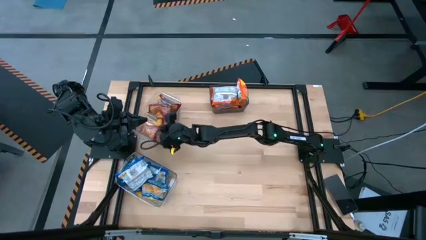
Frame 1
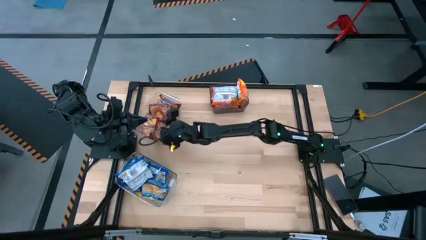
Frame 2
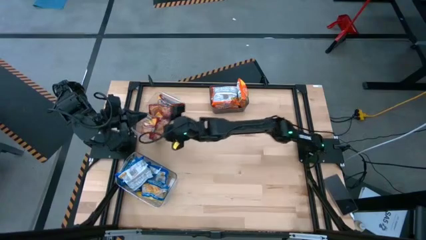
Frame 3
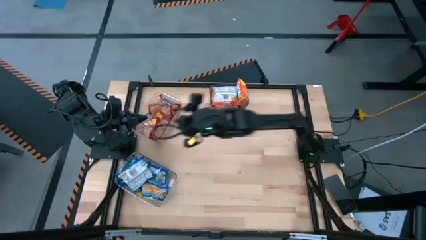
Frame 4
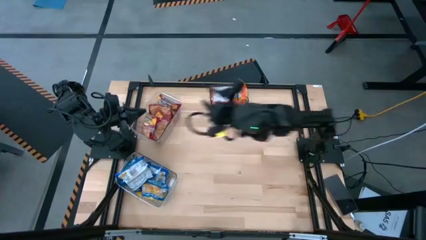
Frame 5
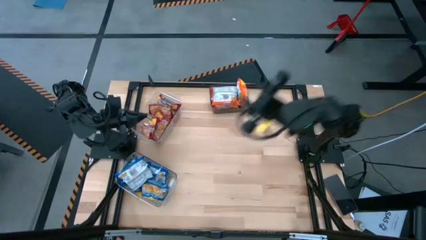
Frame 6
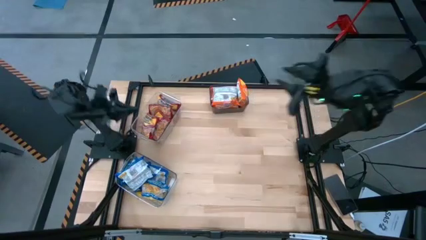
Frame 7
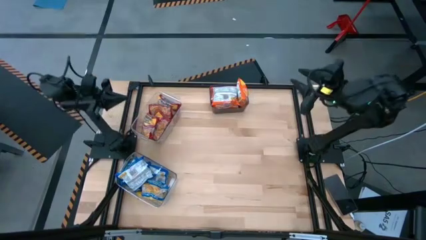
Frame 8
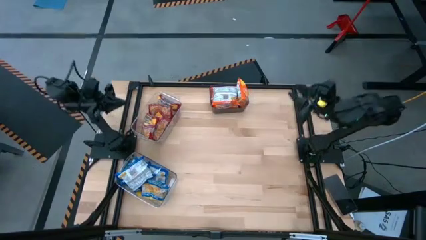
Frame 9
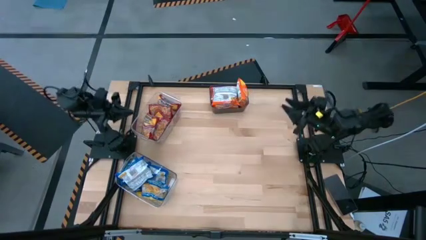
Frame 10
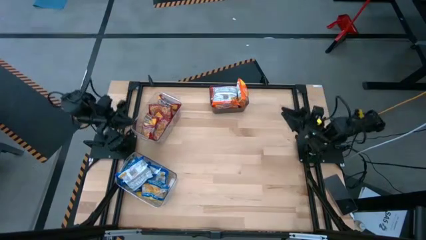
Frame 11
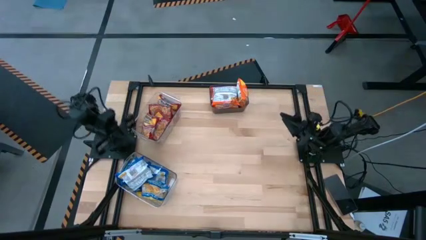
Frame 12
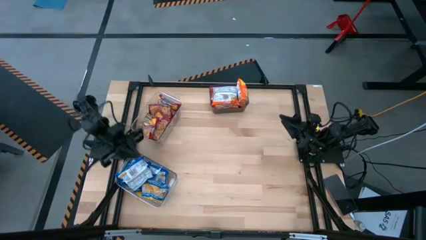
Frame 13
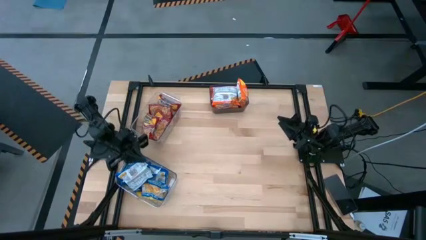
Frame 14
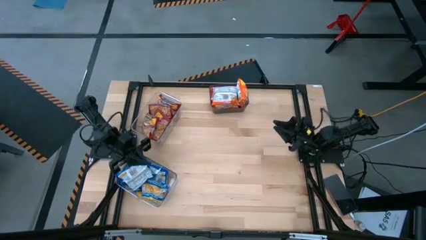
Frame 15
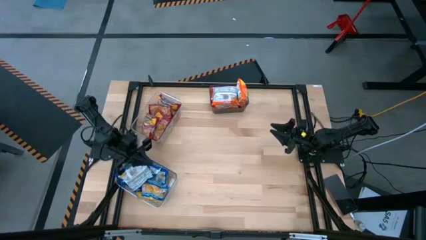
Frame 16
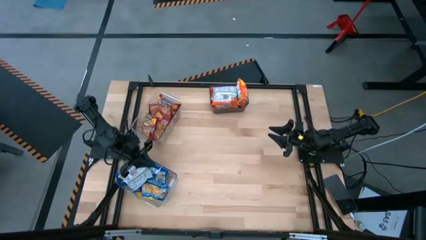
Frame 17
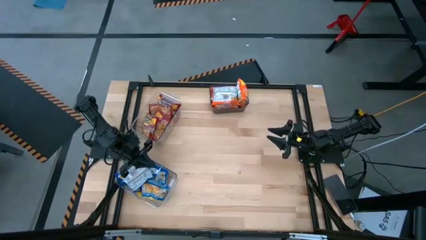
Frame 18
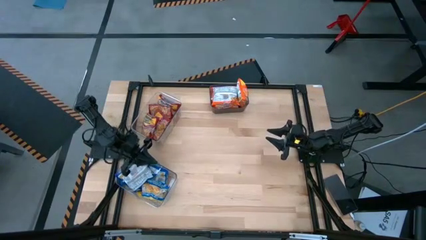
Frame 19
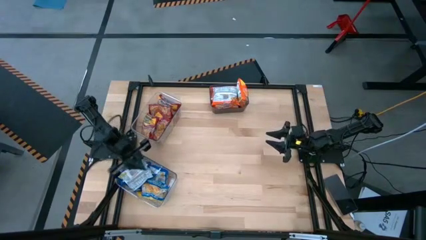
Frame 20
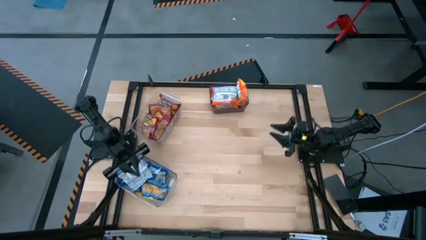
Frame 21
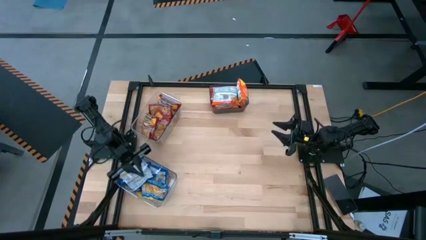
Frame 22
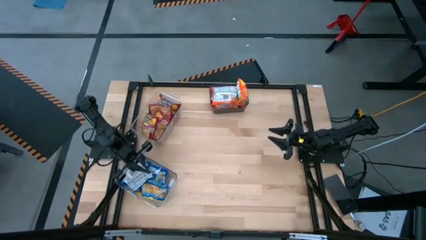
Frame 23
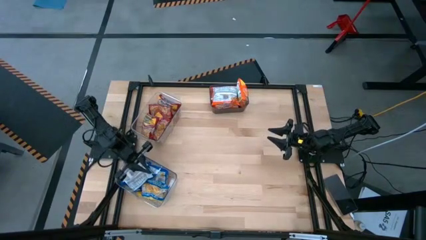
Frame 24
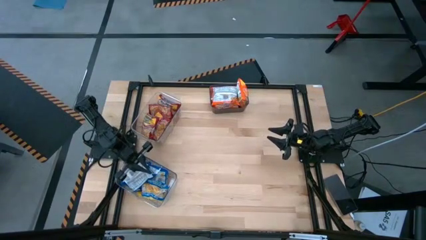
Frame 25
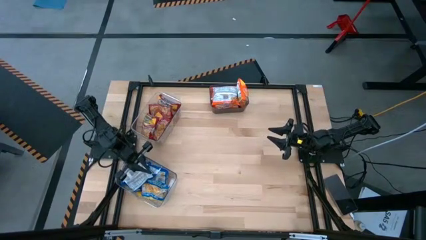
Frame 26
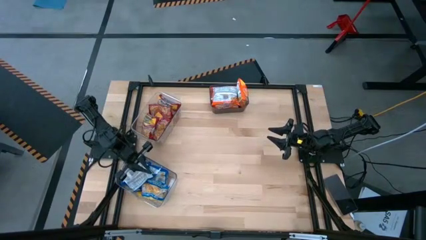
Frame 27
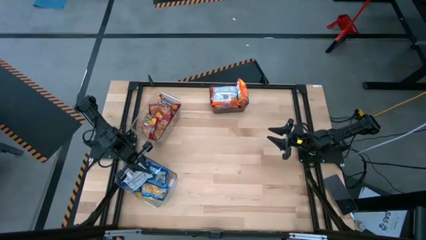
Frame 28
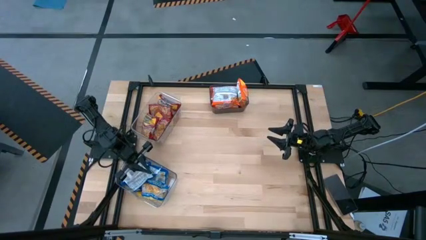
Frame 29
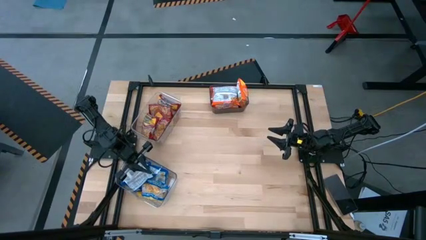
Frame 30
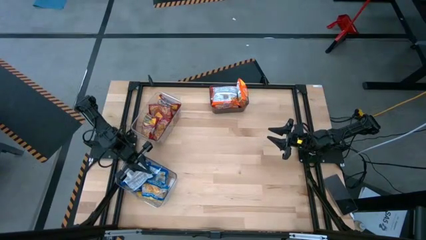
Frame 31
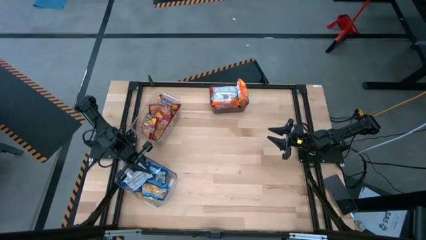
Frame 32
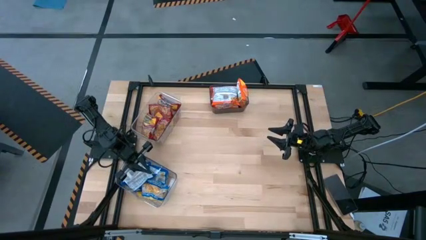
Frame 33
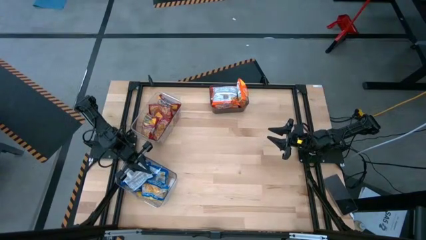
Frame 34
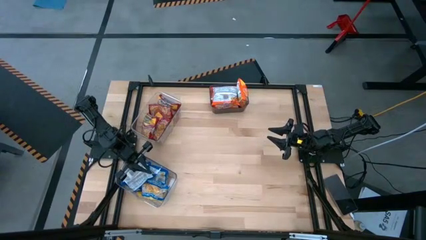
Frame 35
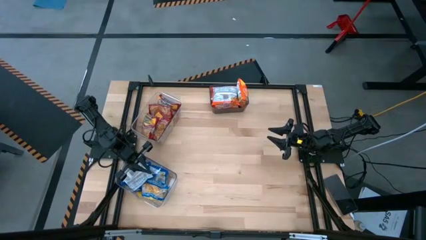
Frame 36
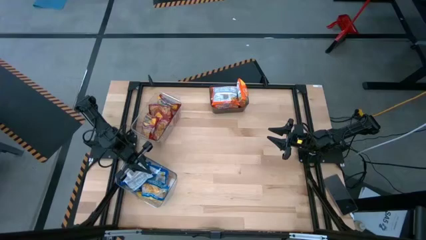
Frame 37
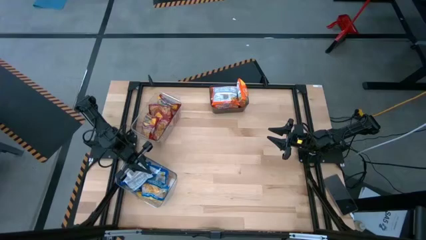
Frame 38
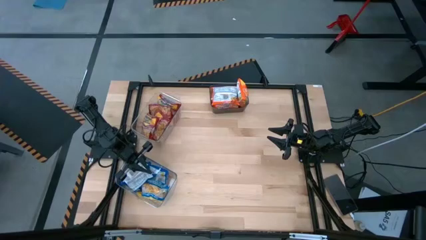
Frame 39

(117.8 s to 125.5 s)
Task: Sort Maruchan noodles
Return to Home Position

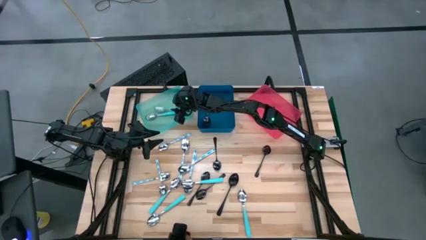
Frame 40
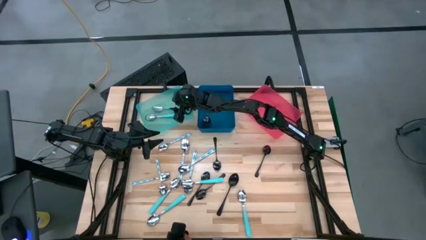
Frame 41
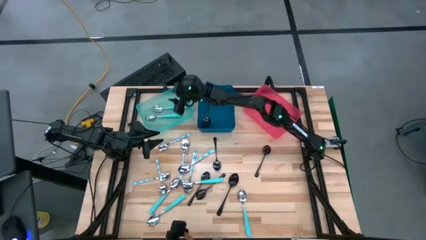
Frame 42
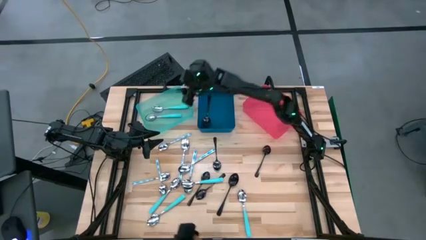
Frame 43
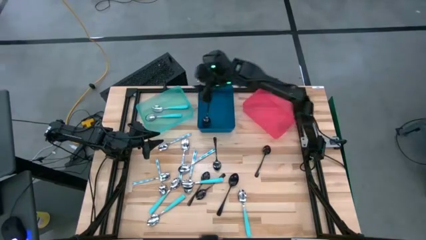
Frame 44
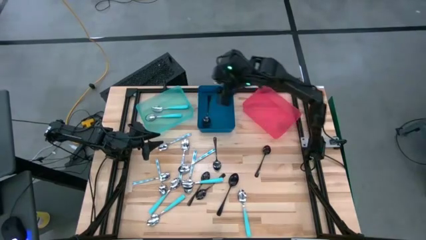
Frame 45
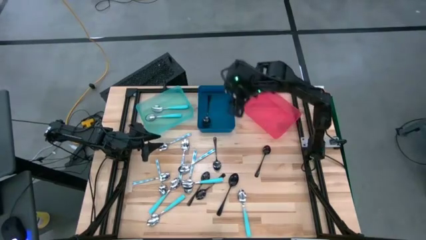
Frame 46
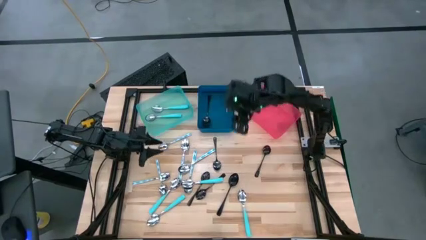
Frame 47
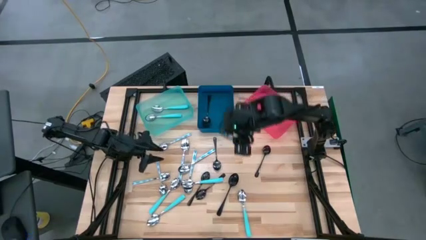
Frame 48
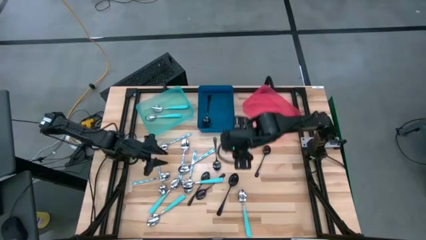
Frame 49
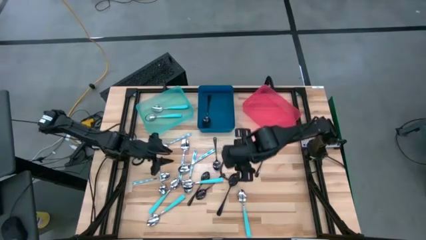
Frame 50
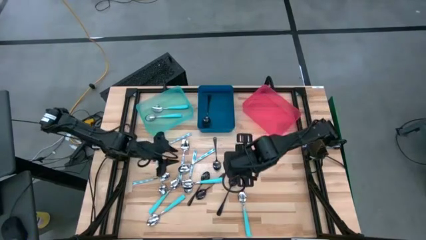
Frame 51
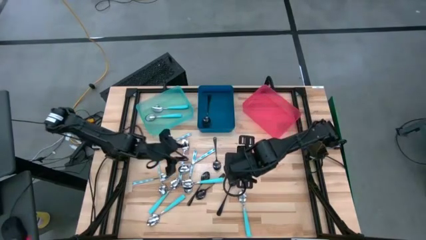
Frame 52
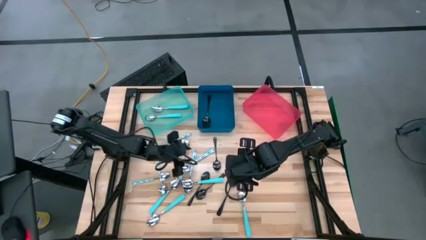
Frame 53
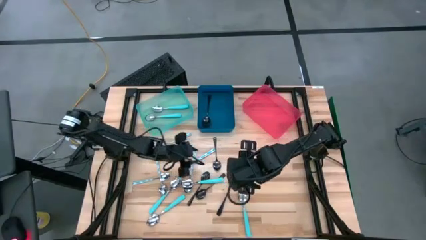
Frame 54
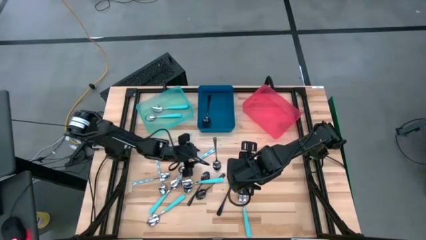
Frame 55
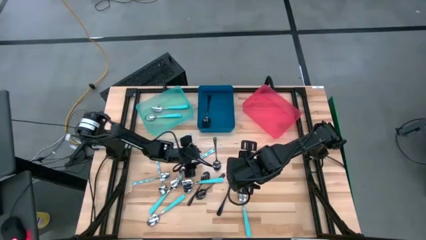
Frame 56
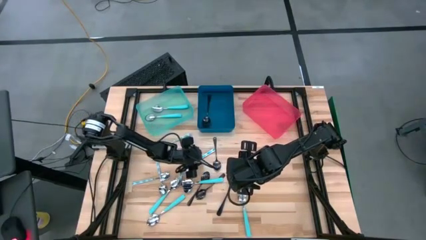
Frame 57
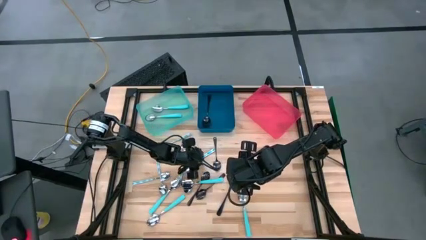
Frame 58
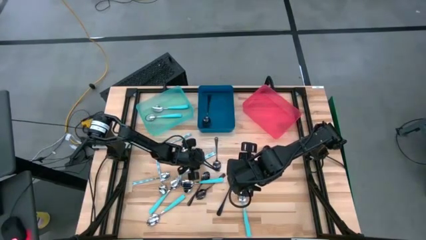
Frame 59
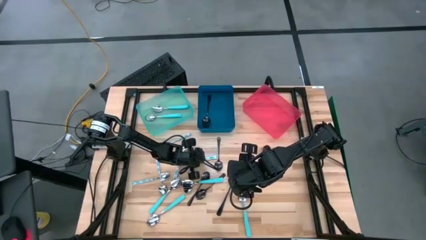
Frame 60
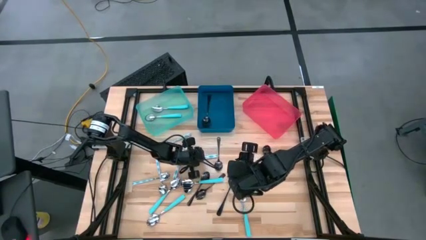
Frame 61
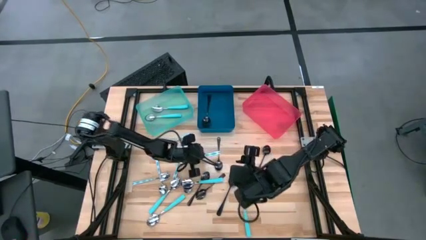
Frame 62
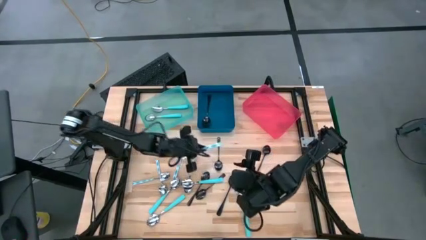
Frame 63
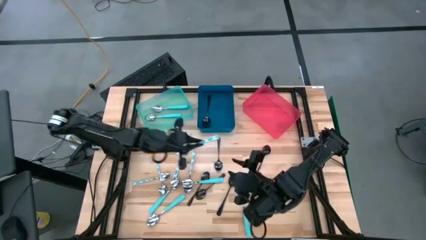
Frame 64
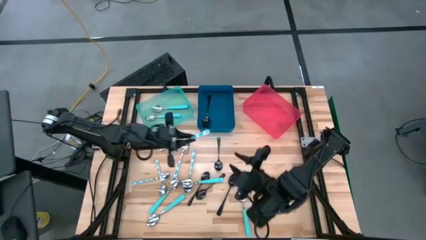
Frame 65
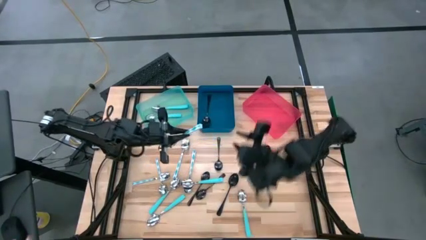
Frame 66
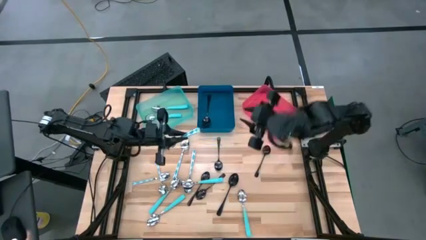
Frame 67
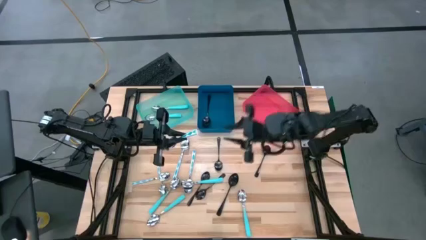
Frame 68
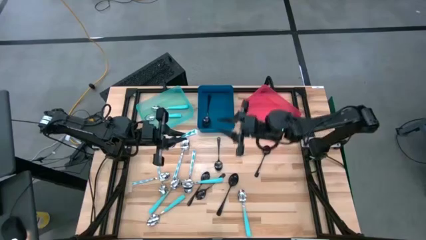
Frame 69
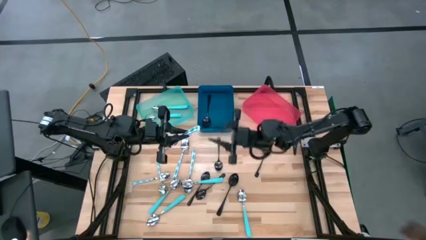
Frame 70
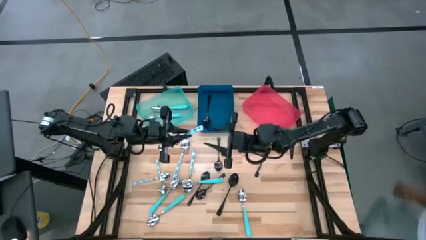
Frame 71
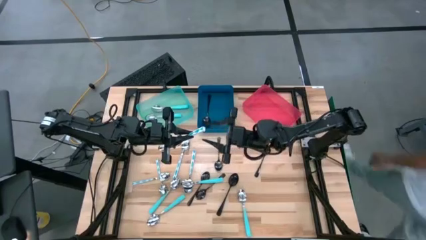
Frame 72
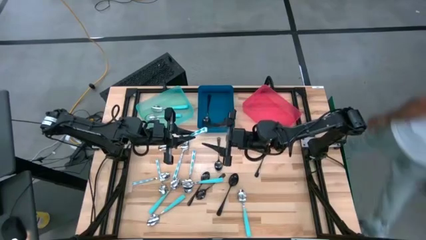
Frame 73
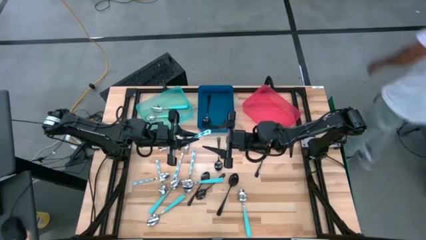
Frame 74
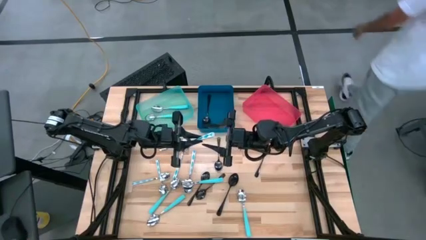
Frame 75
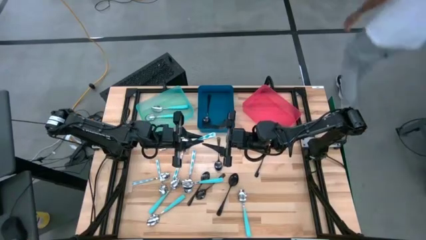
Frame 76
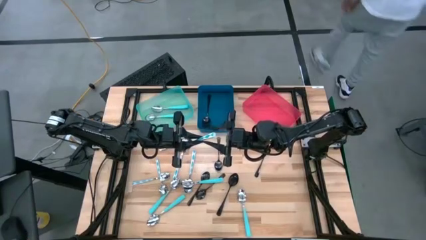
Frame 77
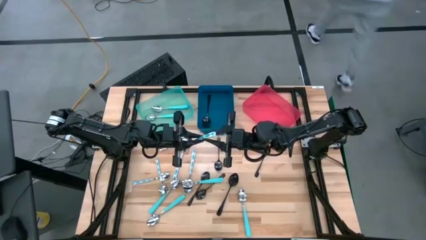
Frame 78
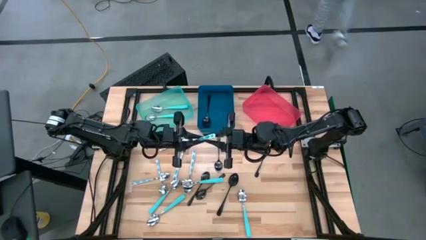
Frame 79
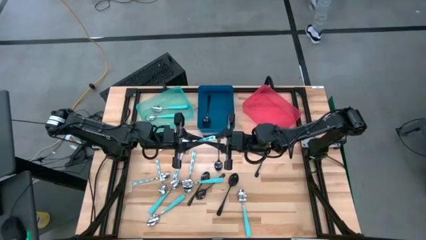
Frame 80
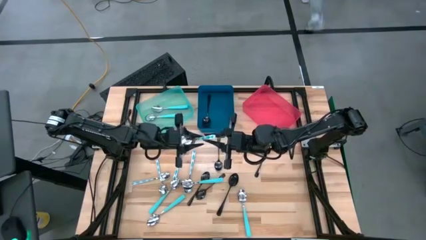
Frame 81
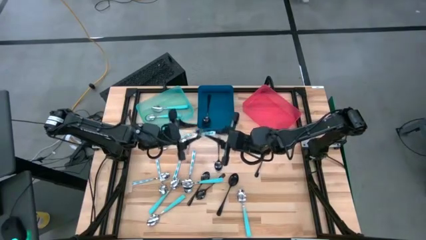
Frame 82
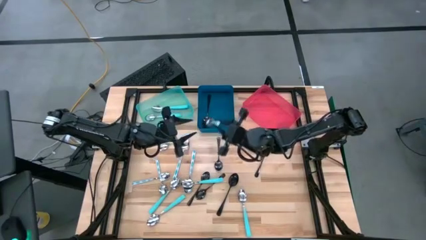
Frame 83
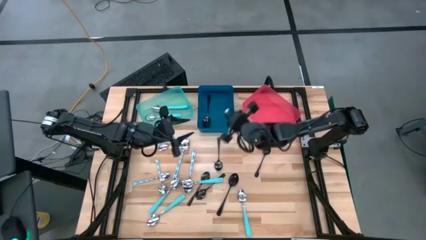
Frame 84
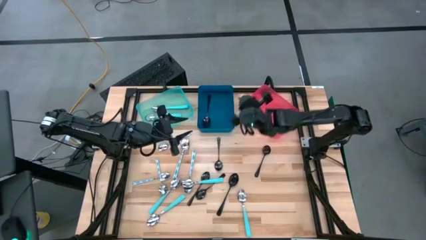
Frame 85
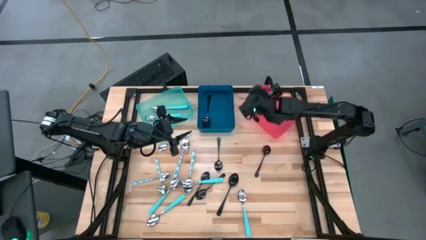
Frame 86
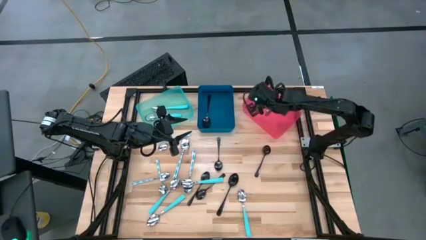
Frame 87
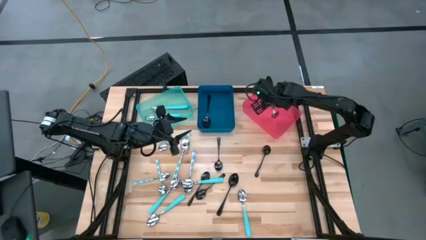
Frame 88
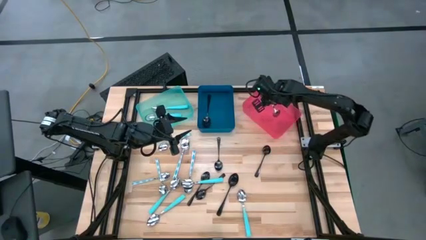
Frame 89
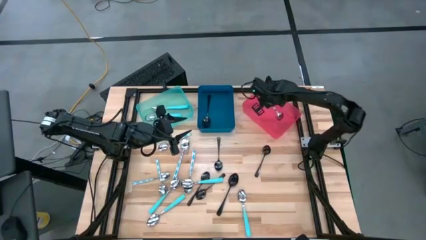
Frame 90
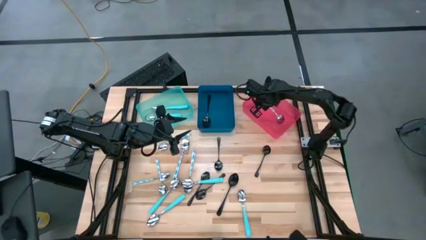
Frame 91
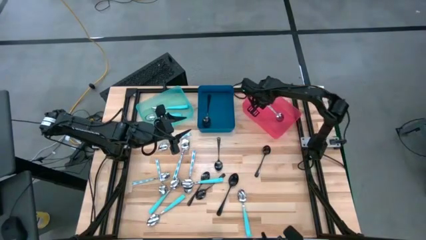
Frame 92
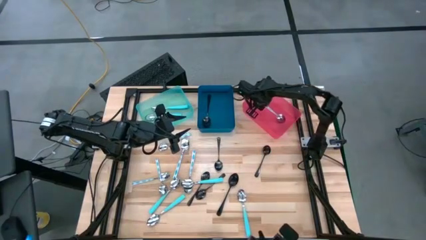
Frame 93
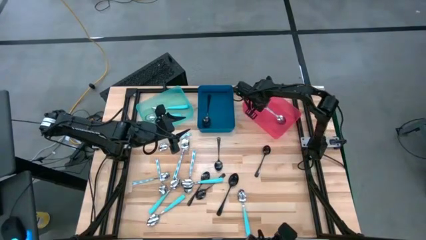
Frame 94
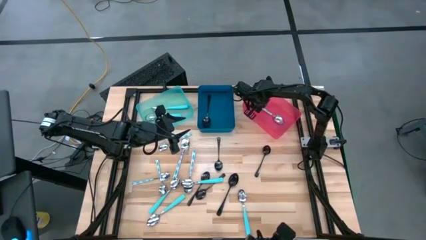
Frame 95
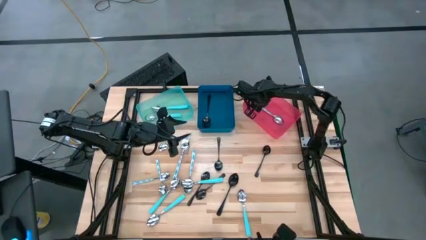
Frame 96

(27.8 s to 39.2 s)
Task: Sort silverware by color (type)
Put the white patterned spoon into the pink bin
